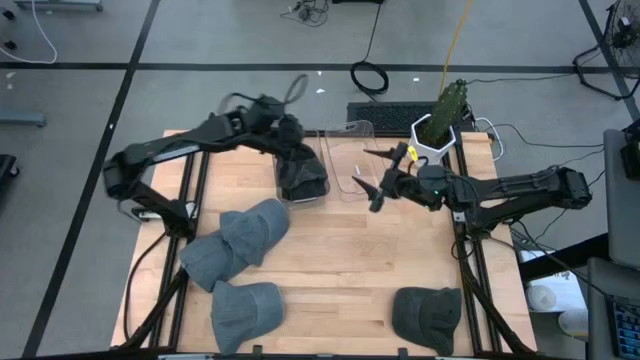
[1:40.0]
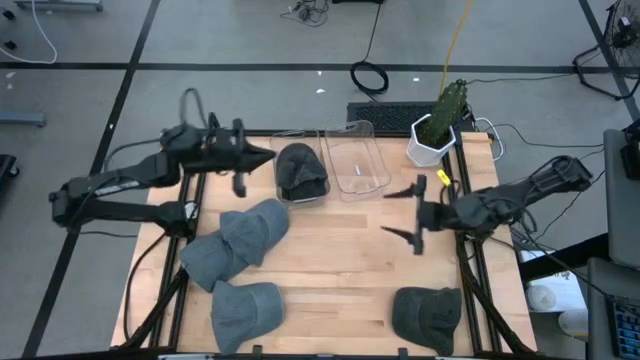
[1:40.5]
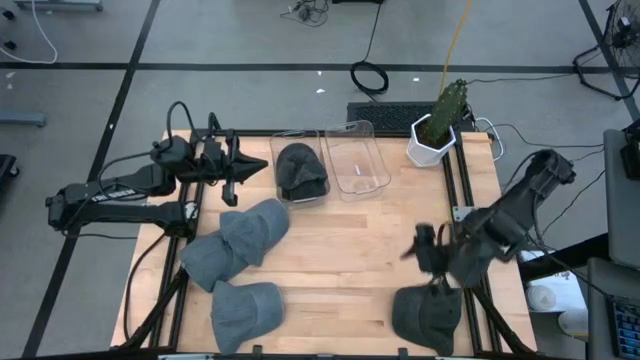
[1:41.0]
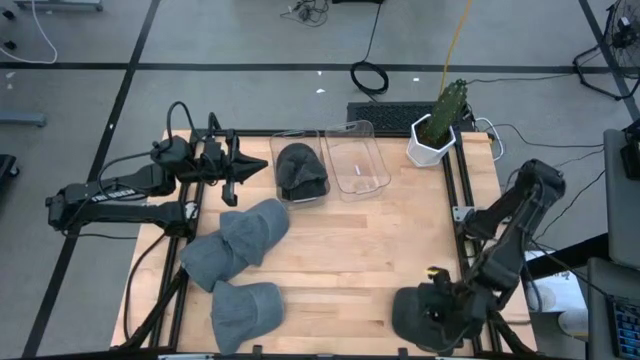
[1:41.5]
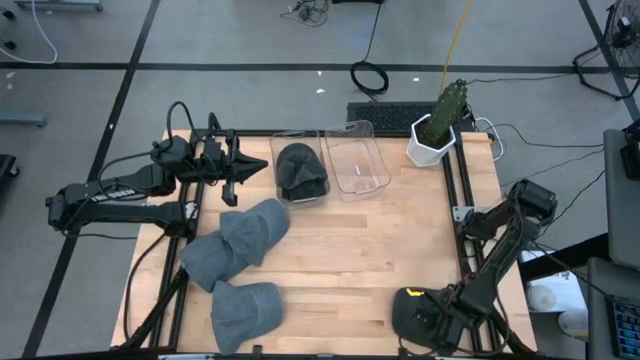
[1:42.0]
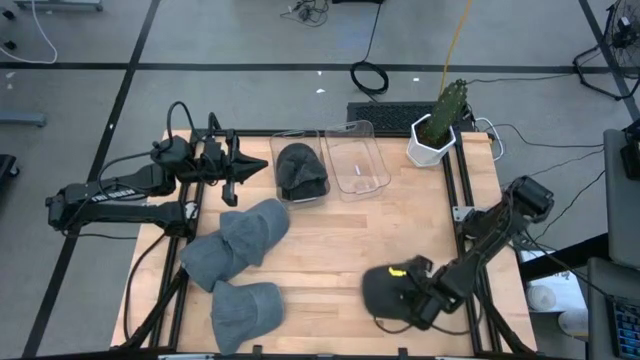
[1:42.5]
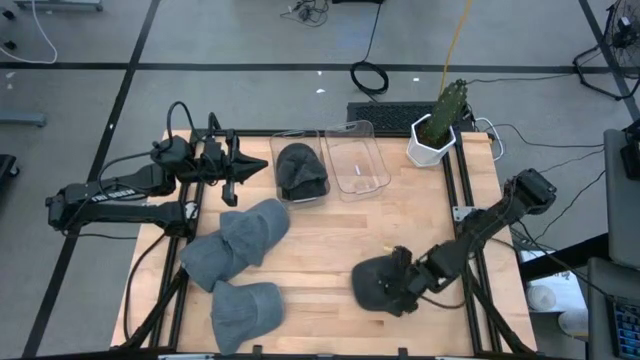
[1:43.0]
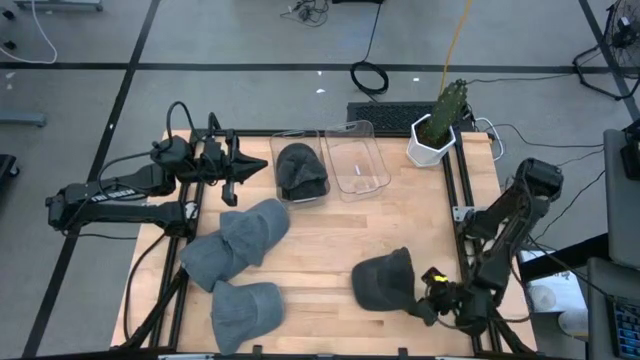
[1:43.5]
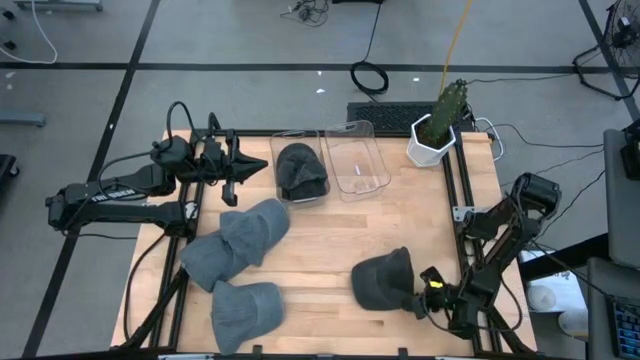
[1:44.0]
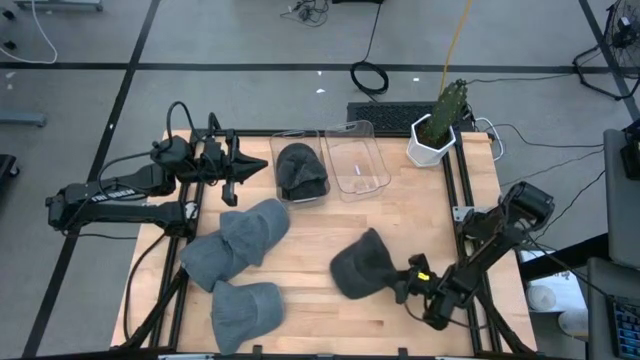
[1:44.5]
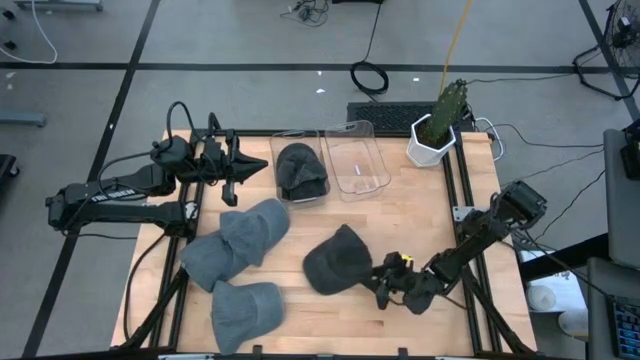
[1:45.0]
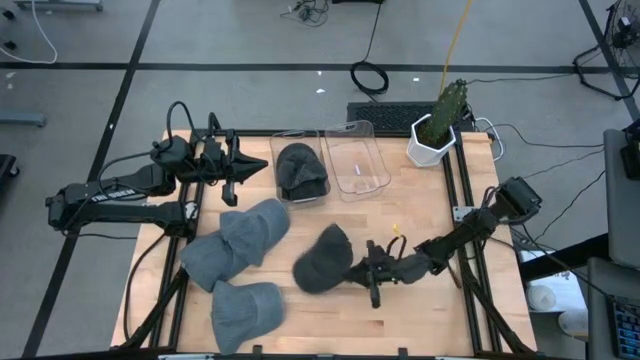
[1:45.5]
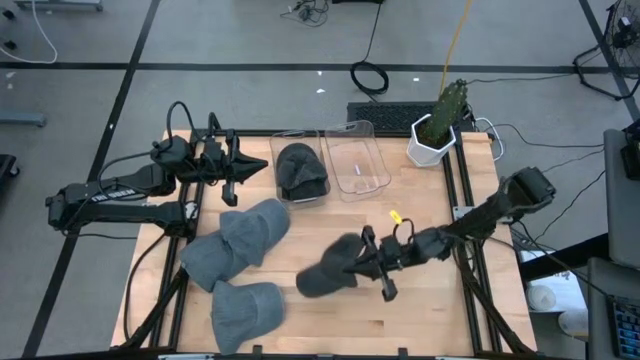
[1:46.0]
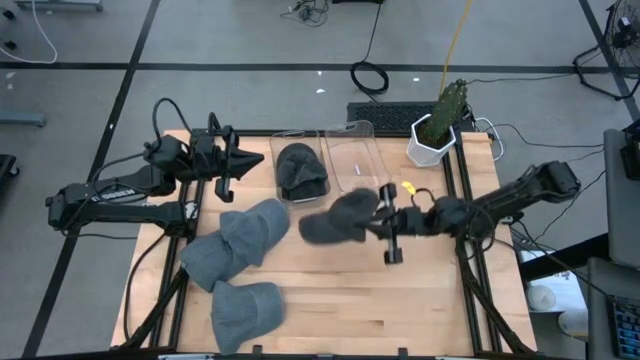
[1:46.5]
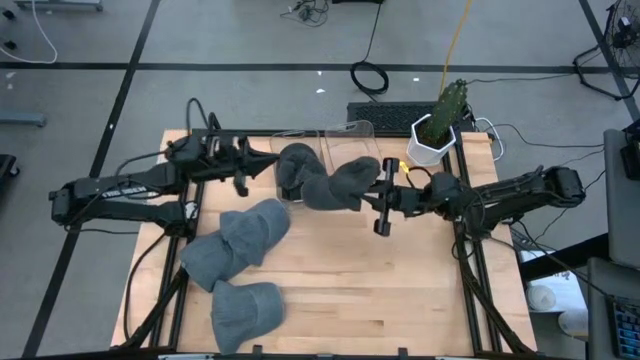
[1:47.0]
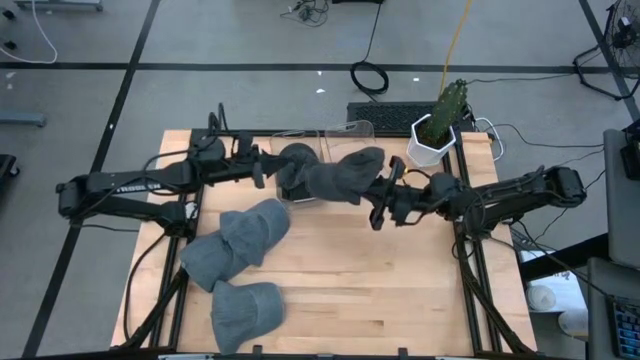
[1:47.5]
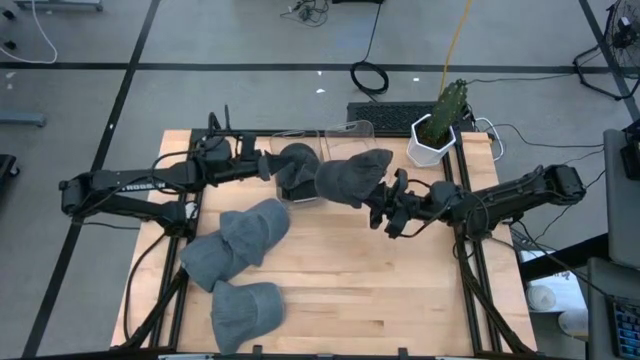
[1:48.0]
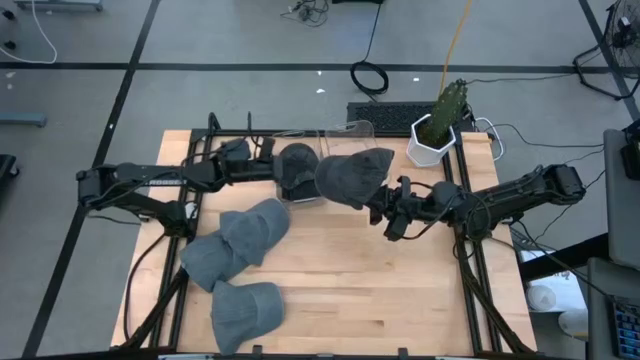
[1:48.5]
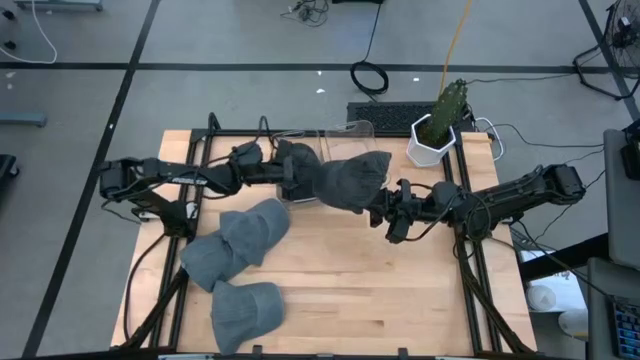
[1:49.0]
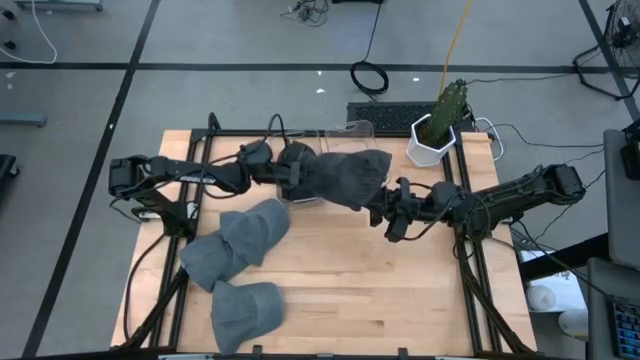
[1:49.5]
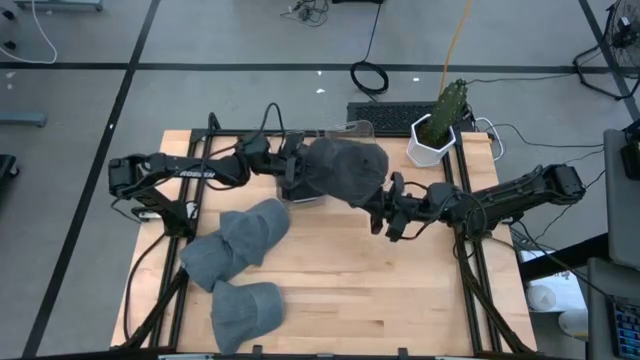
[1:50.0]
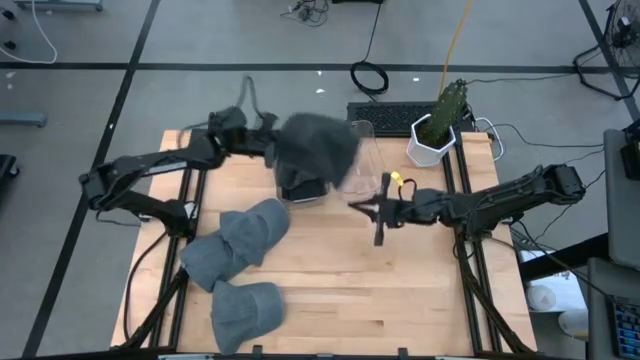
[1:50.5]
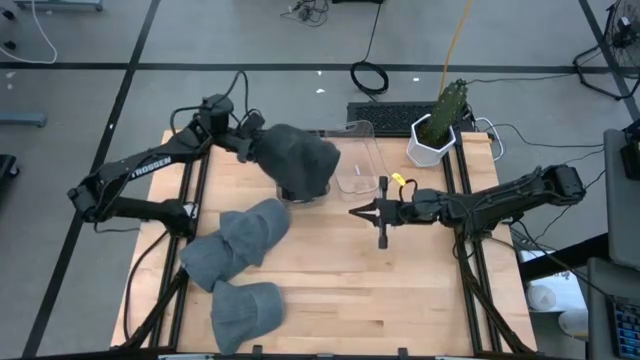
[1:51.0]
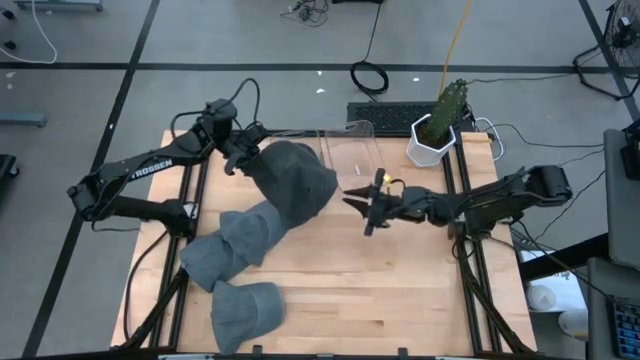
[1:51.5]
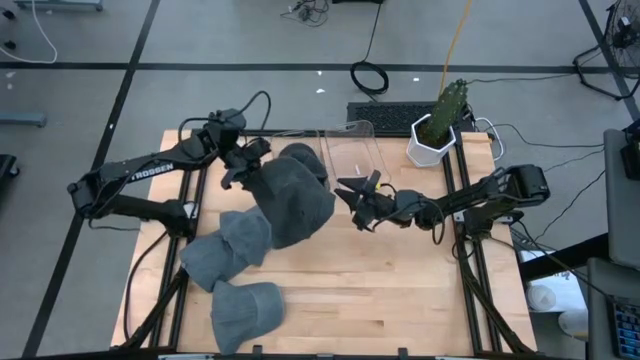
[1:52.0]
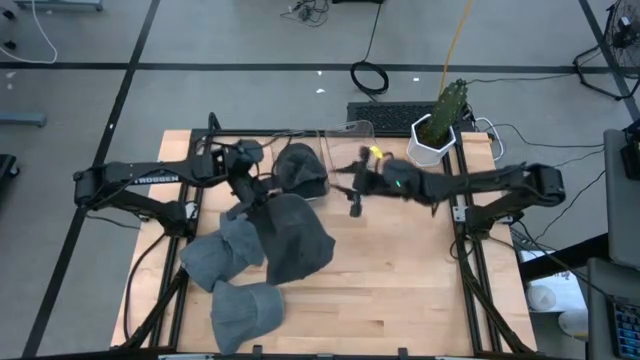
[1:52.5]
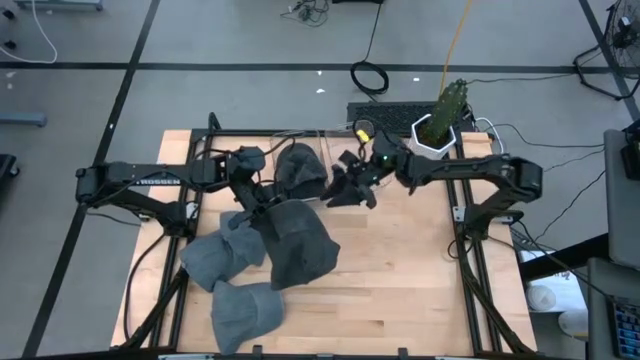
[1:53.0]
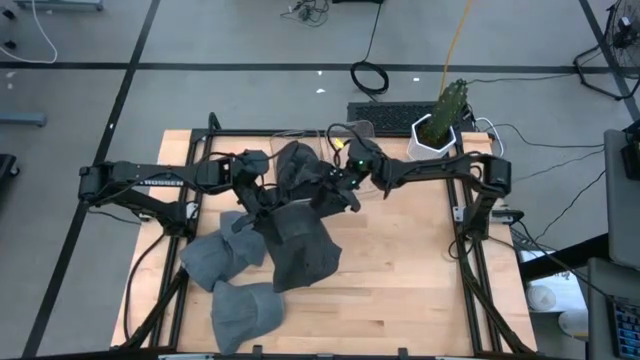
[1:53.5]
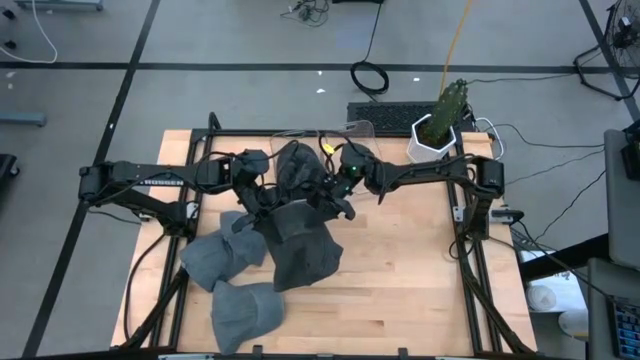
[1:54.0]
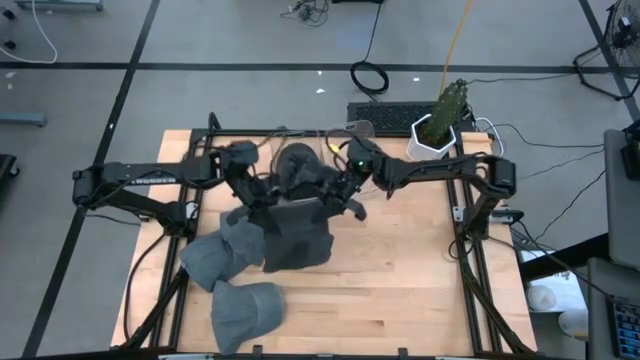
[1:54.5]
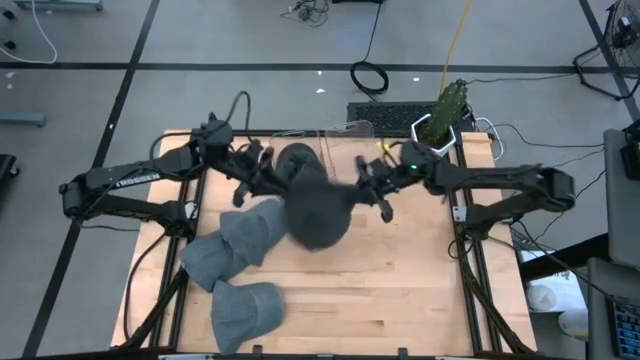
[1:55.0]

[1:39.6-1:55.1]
Task: Pick & Place hat
Put the black cap into the left transparent bin

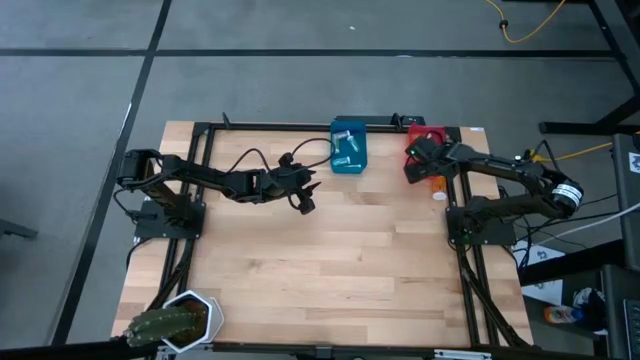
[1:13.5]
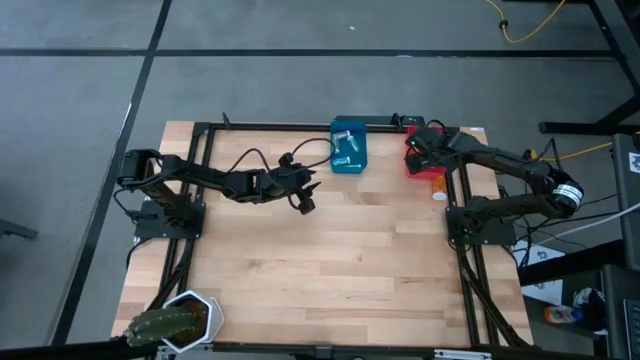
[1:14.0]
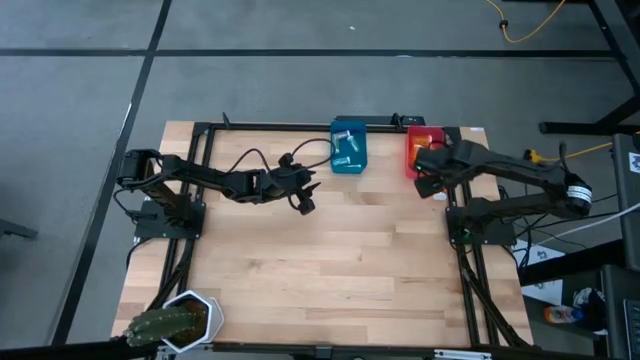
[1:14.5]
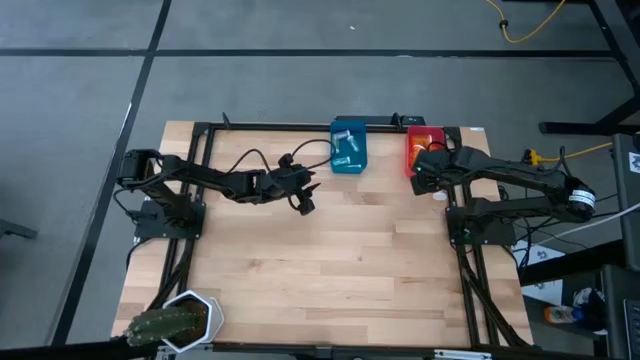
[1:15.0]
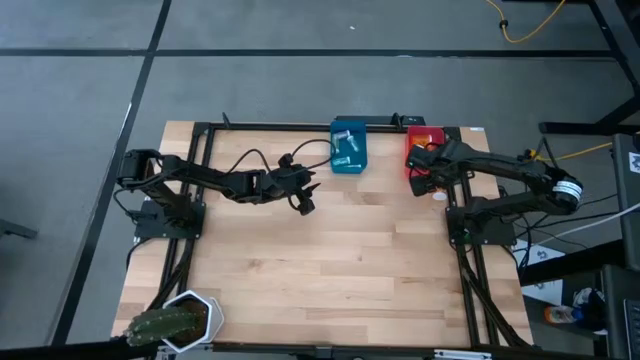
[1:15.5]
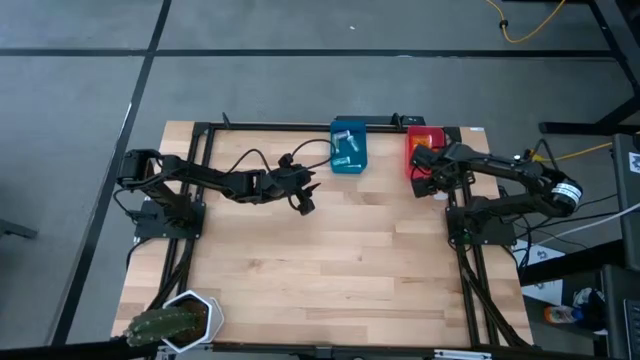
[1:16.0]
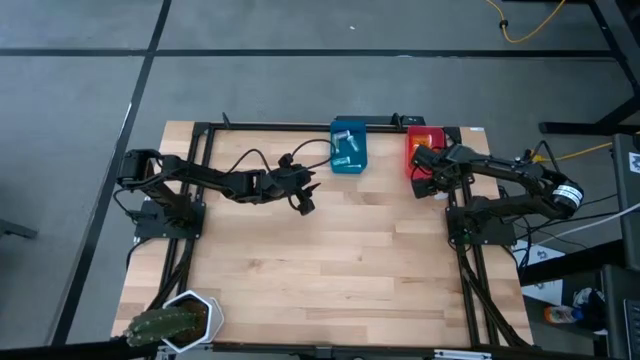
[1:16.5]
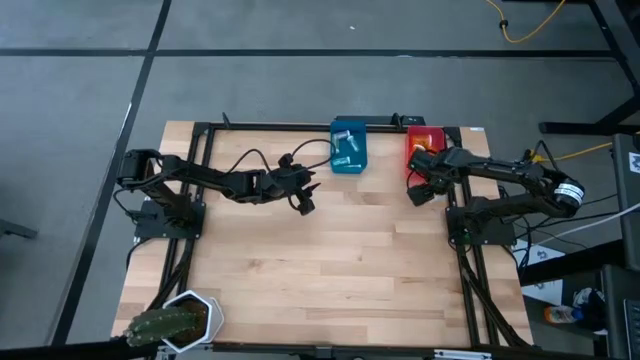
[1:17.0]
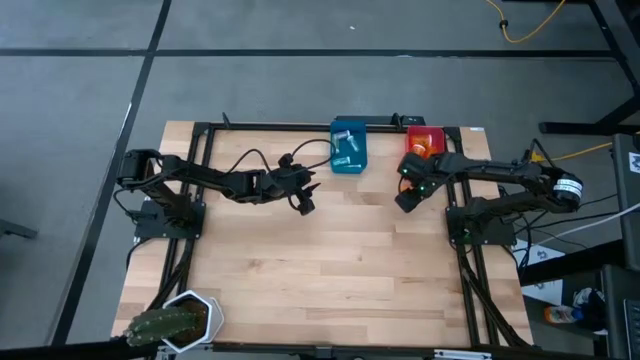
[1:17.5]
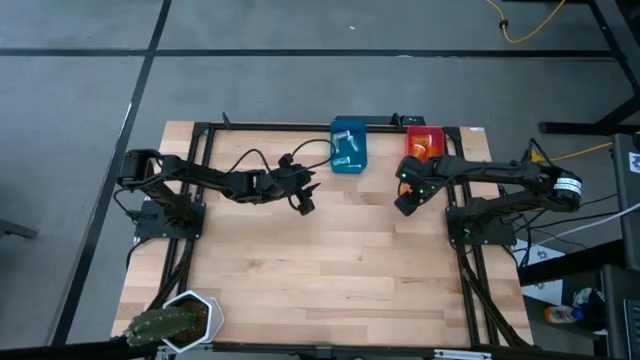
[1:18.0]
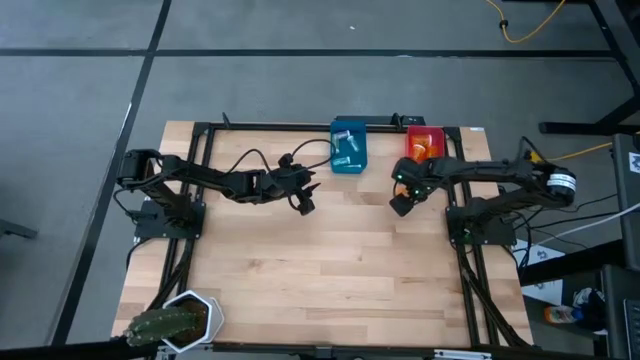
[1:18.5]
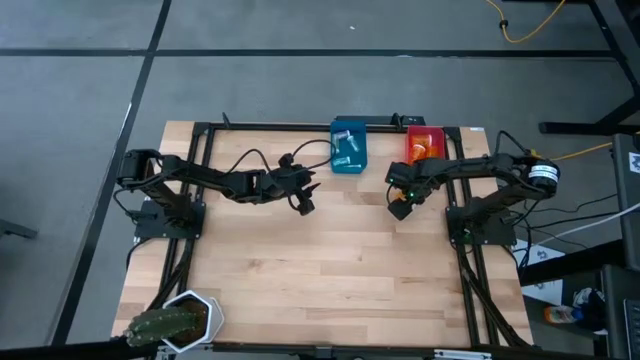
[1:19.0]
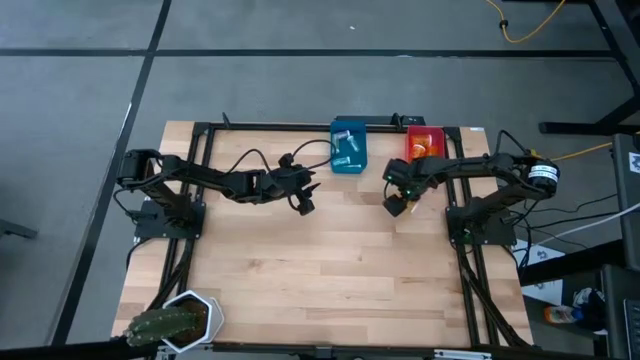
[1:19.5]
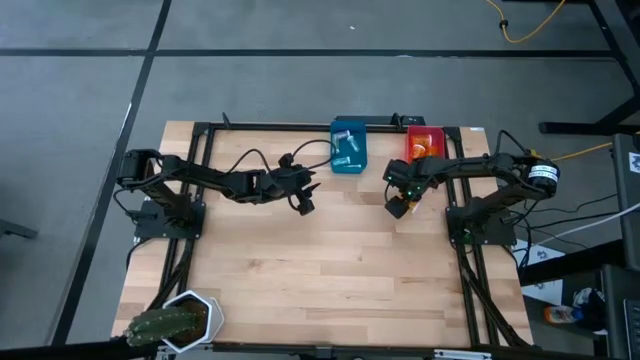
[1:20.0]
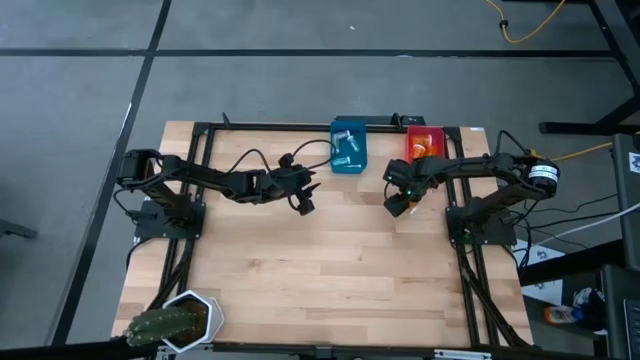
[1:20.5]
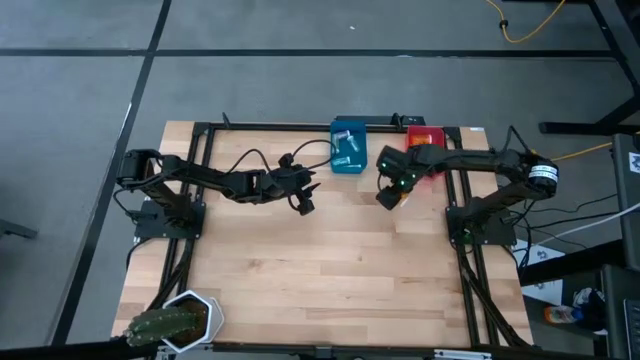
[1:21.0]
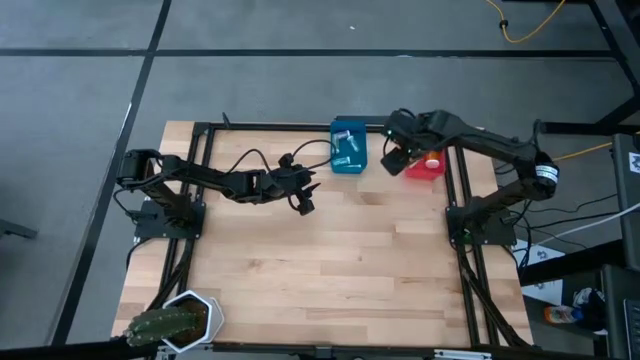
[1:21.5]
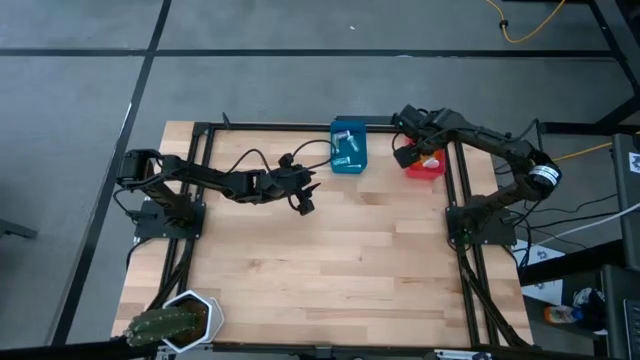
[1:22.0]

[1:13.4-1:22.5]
Task: Pick and place medicine bottles into bin by pill shape (circle, oval)
Put the big orange pill bottle into the pink bin
